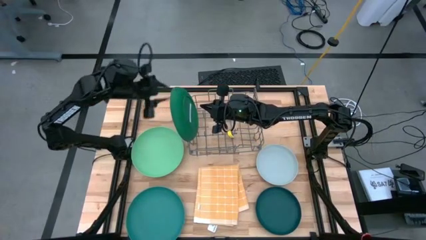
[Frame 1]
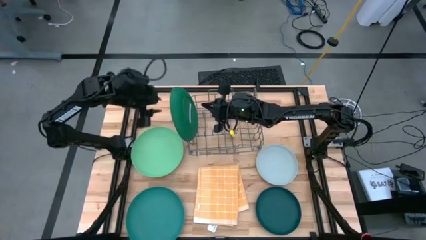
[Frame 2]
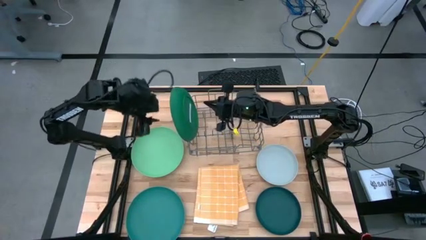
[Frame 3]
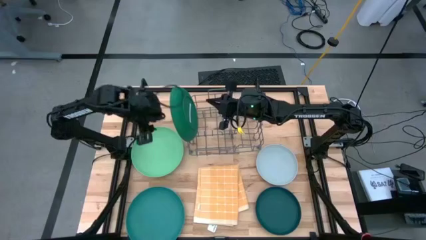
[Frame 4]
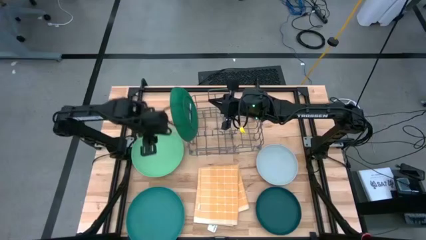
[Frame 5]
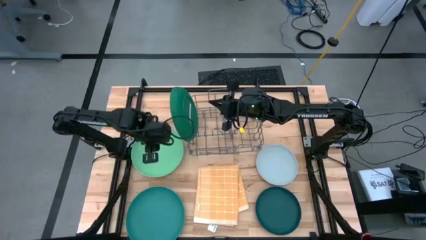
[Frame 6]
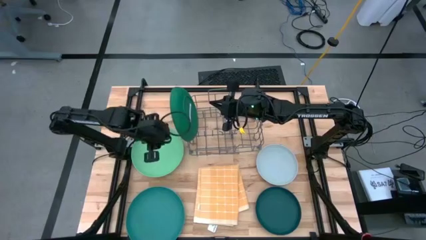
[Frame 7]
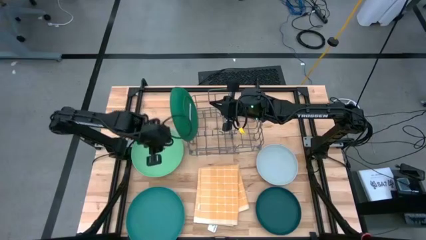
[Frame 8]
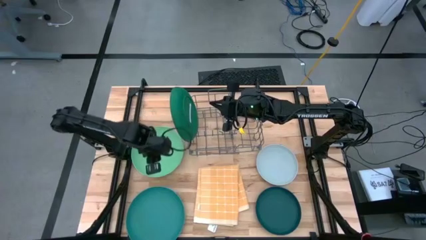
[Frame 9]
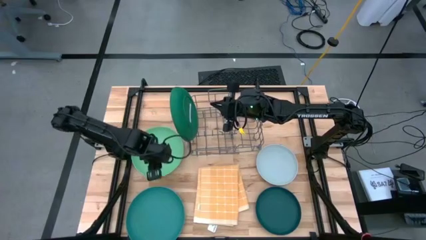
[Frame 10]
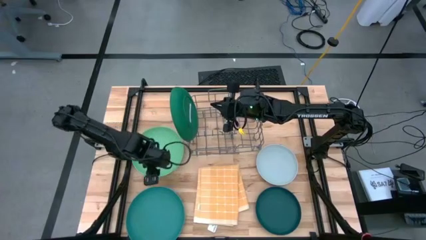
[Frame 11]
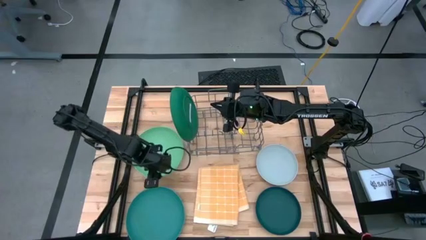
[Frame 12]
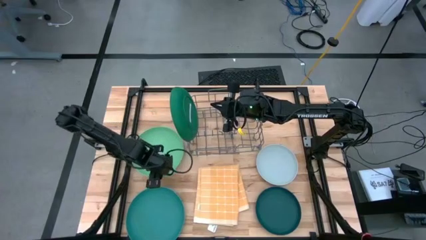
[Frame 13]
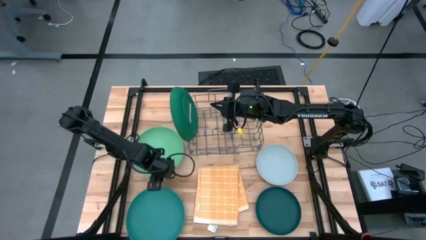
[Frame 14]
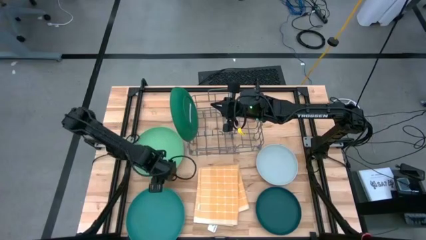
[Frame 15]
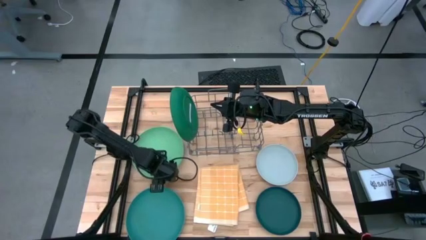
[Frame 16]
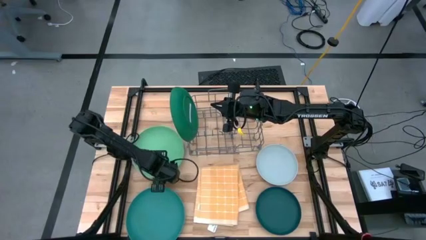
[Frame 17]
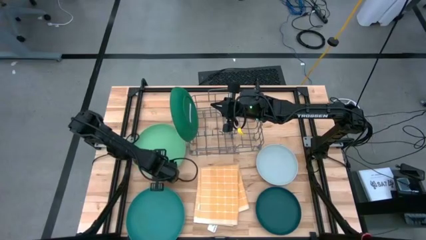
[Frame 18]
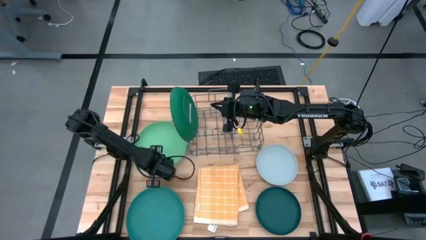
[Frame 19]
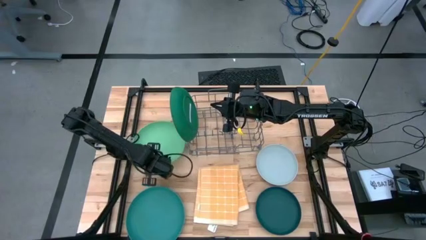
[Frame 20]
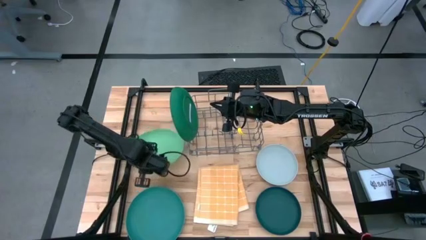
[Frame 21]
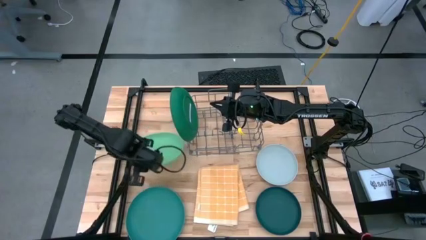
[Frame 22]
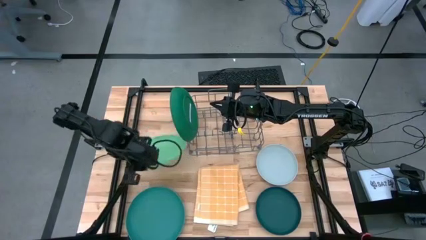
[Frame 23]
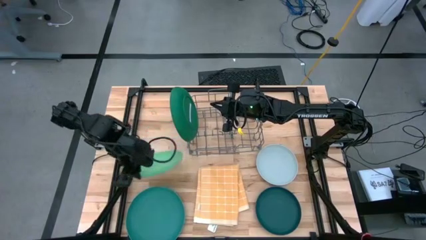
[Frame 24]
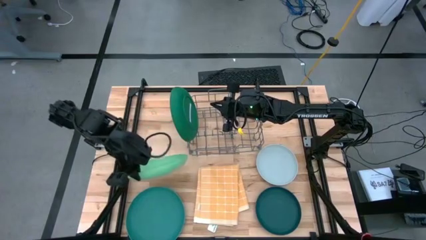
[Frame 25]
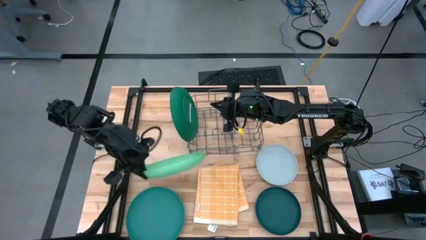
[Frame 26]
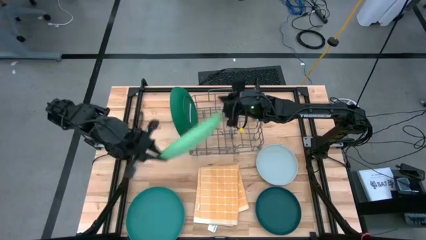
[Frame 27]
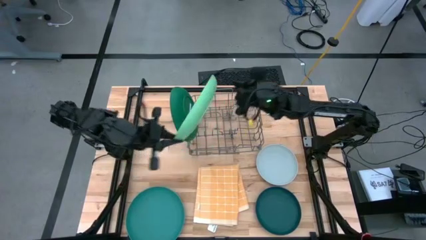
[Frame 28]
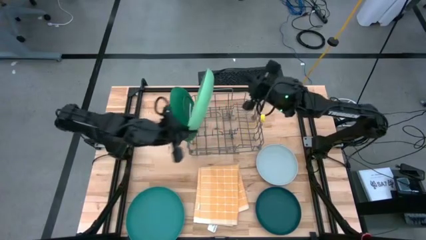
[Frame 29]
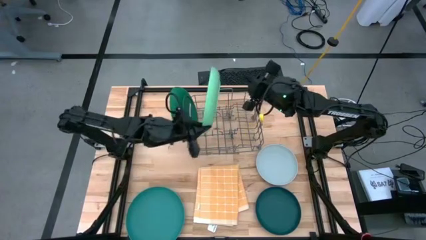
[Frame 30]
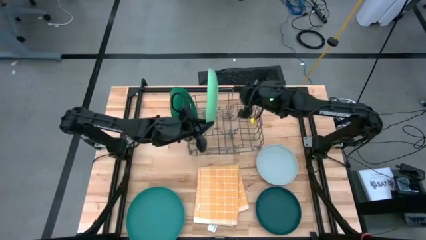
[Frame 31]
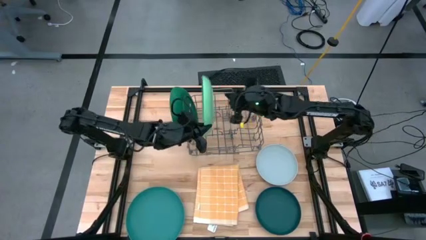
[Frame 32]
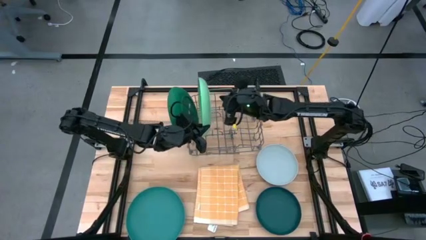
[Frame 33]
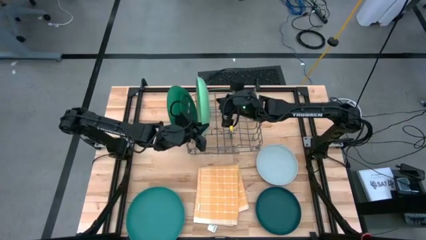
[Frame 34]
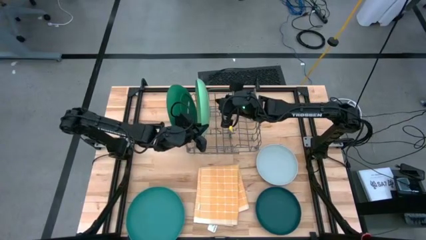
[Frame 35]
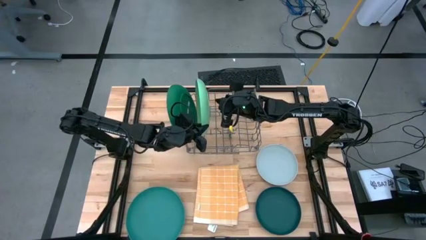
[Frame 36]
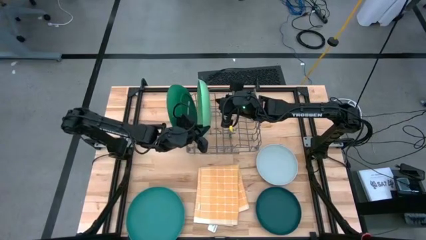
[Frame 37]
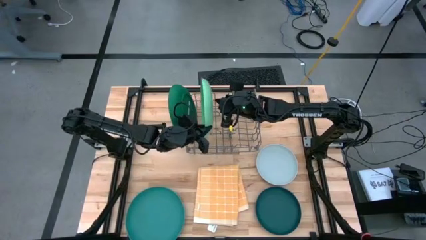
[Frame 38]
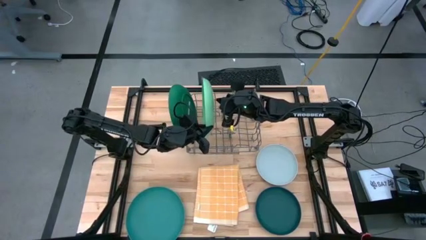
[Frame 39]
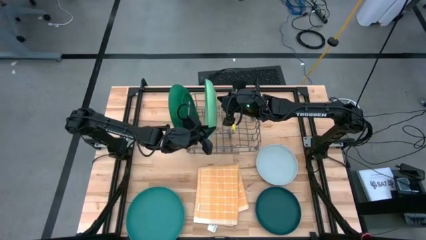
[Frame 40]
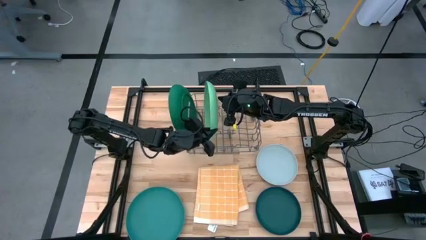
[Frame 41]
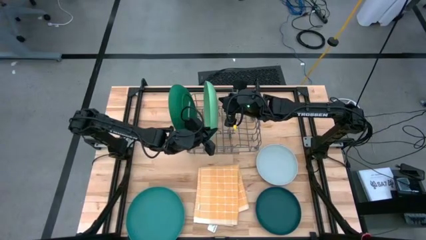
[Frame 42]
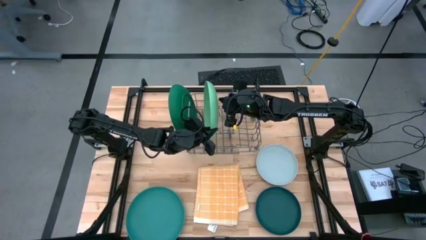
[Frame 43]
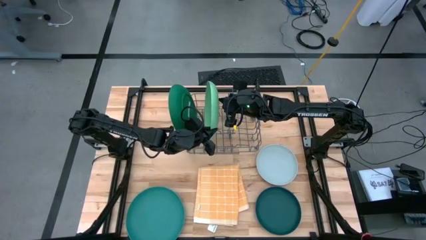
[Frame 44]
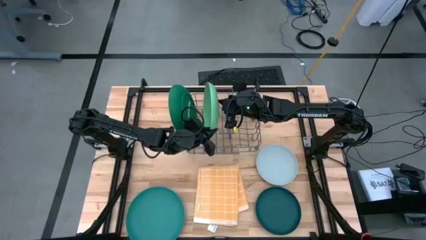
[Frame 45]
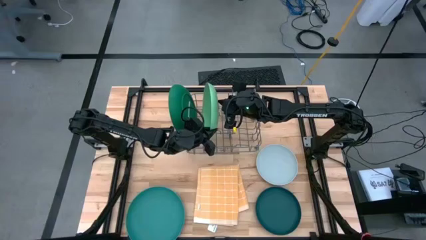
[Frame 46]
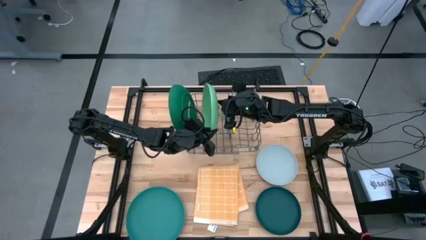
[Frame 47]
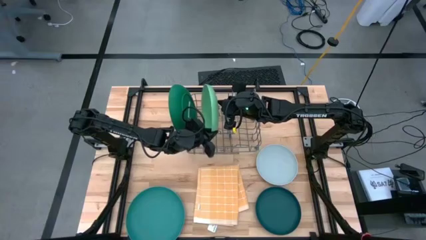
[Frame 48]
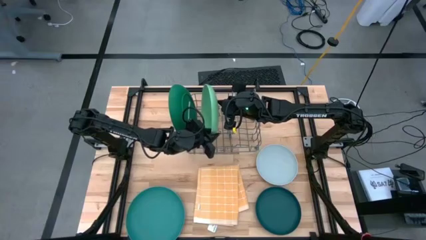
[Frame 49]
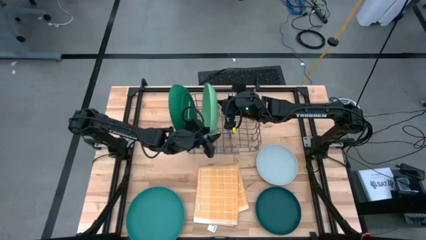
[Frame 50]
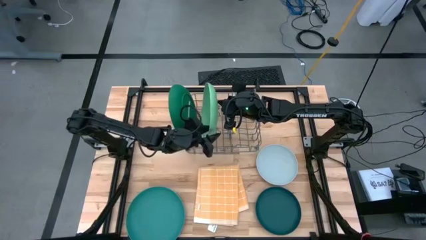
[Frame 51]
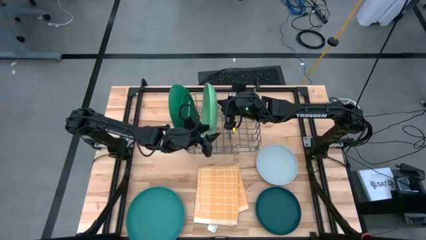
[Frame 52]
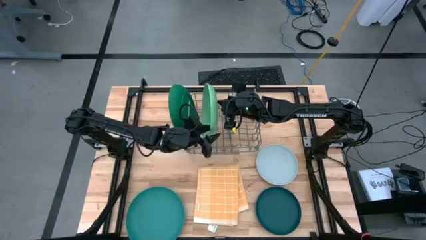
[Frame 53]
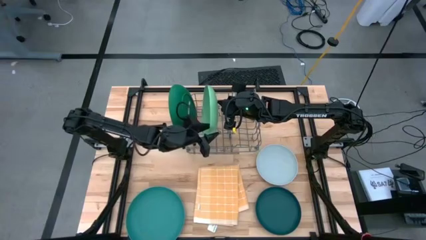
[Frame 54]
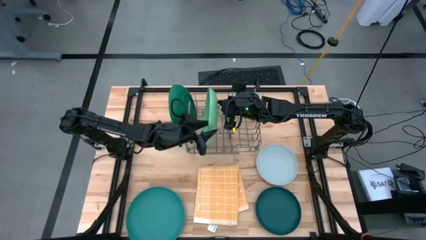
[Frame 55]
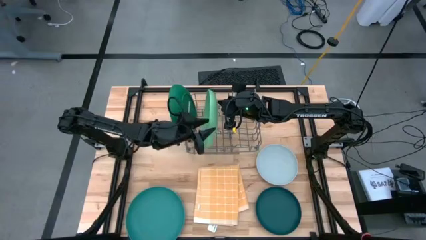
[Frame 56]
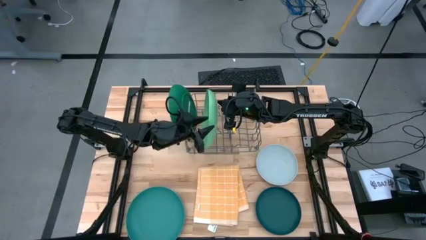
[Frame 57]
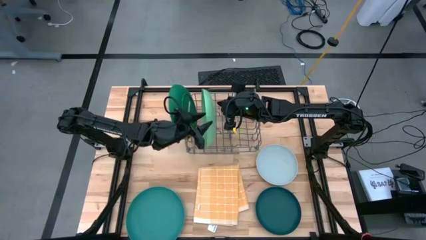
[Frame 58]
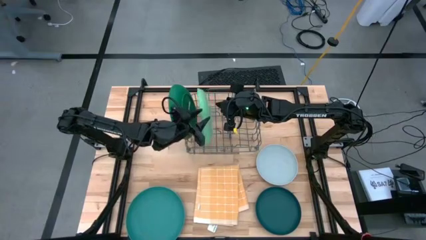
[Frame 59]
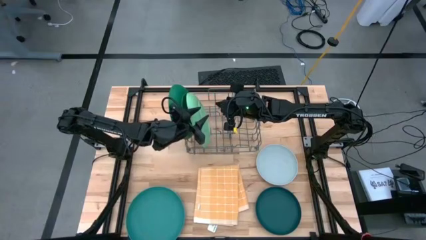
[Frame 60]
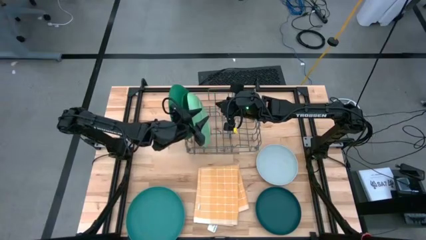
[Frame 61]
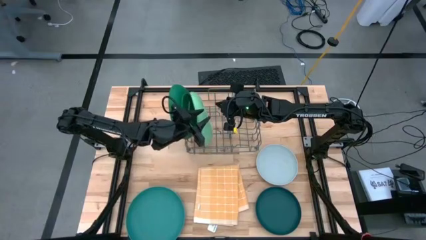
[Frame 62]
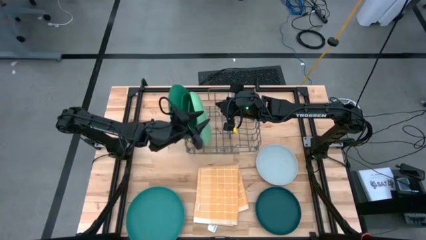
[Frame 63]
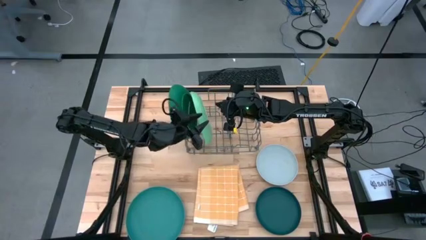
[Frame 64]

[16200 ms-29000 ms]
Task: Sort dishes
Put the light green plate in the dish rack
